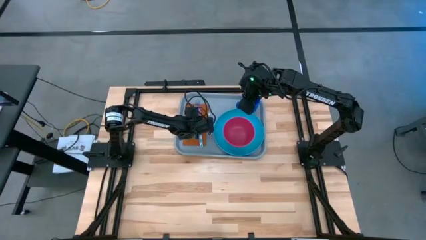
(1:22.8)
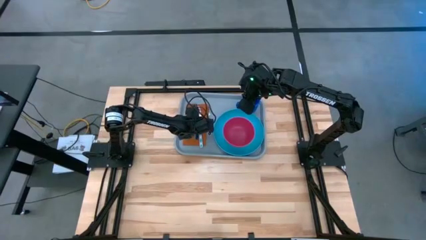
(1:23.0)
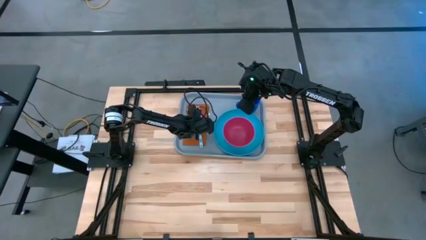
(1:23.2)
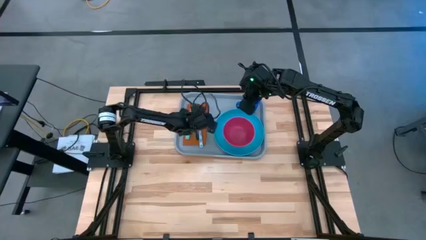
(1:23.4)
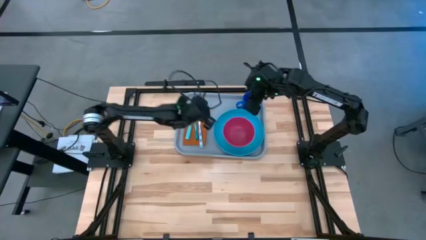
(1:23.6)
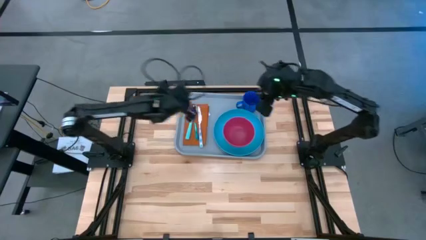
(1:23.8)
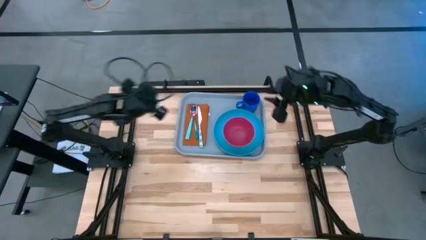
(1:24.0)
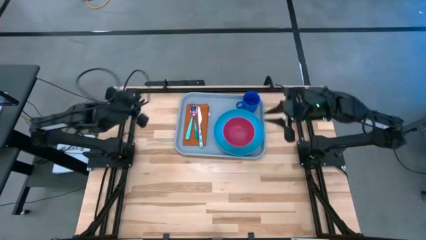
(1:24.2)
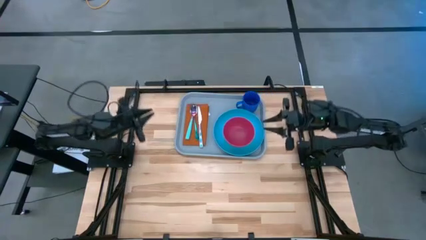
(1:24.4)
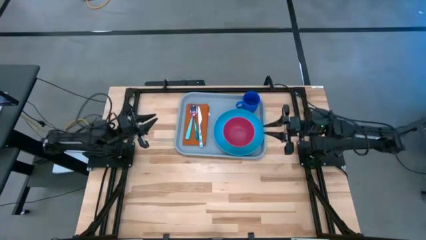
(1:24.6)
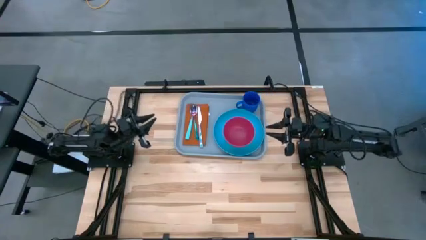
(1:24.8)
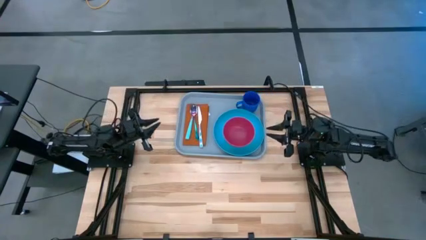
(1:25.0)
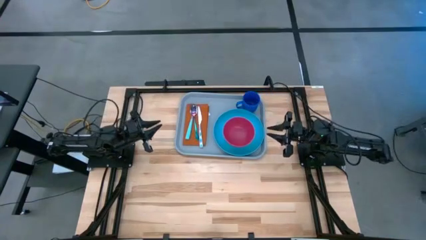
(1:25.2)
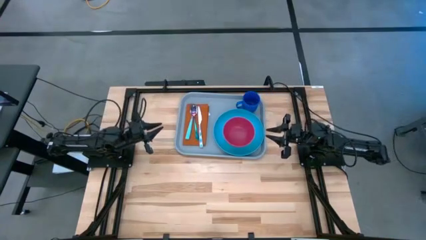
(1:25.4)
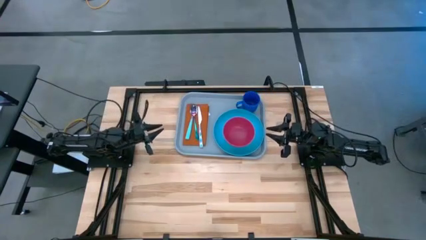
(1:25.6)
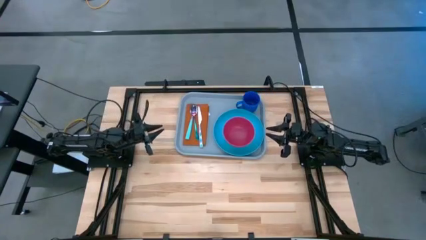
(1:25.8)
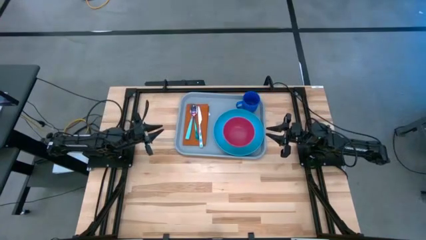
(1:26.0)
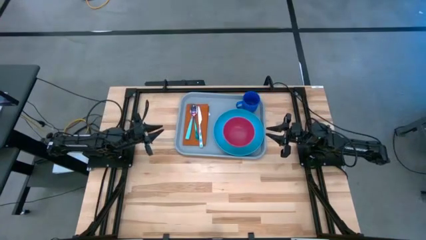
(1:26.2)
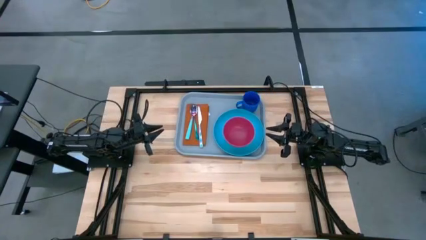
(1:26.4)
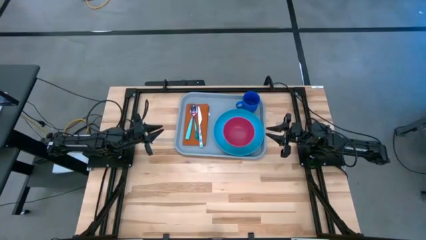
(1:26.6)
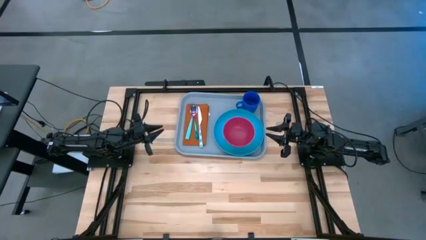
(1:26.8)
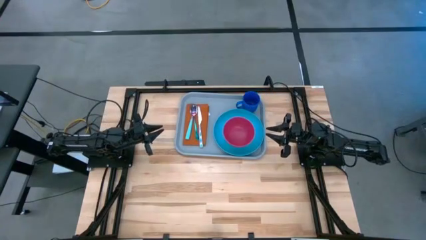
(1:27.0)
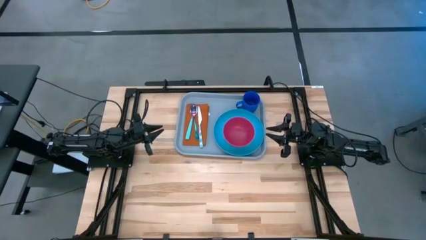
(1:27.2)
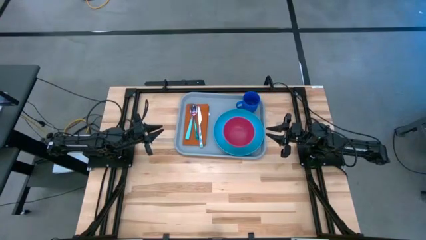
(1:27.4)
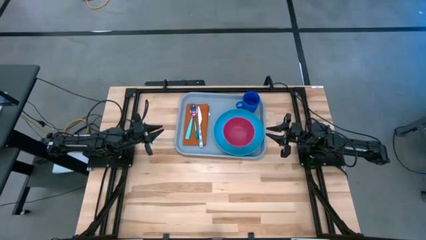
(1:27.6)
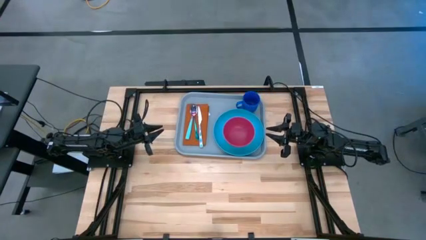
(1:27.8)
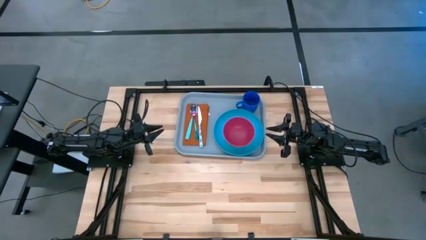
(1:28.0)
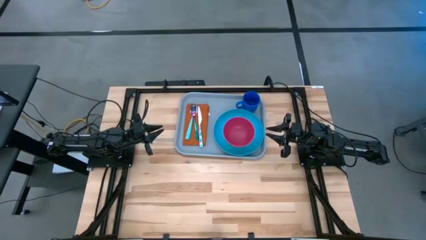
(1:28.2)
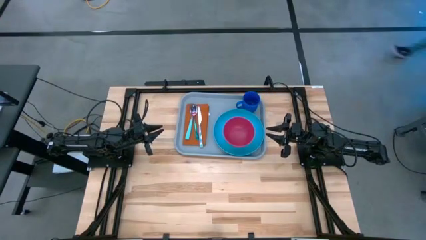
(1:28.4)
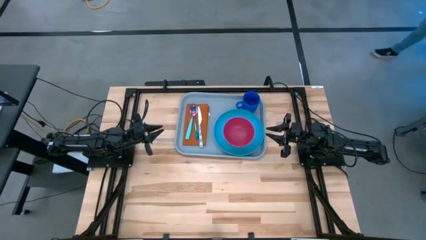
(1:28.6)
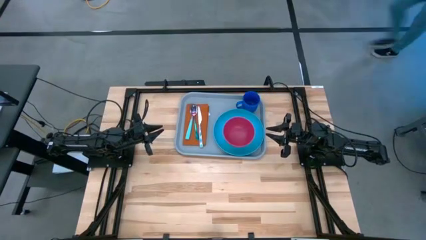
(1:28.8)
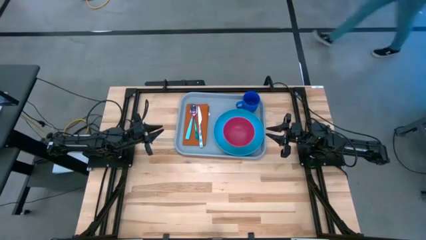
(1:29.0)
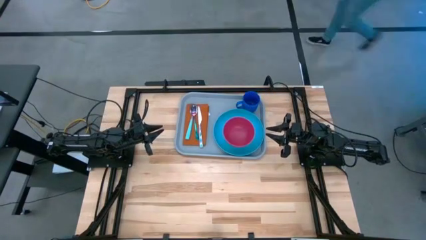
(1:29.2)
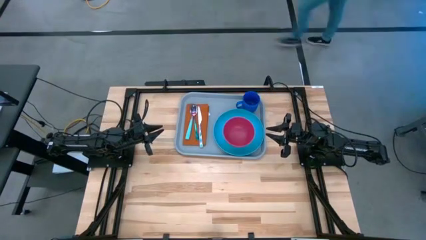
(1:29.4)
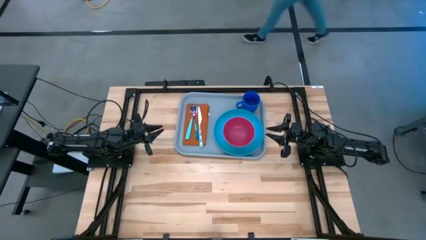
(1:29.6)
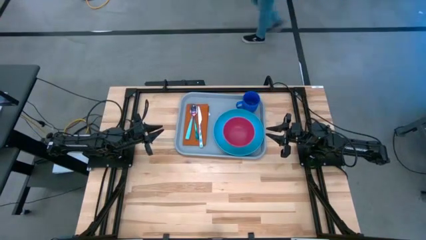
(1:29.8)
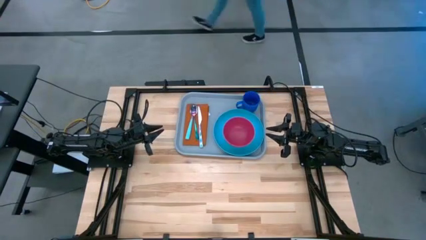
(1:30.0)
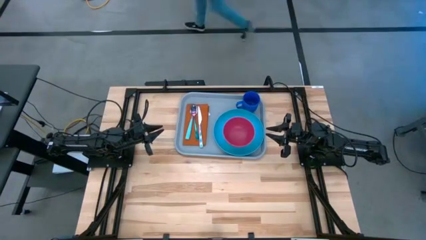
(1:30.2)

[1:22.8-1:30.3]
Task: Set up tray
Return to Home Position

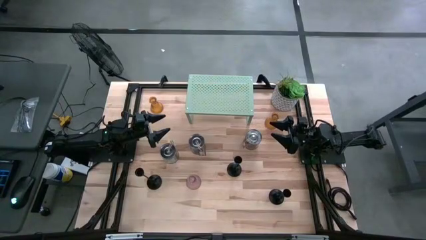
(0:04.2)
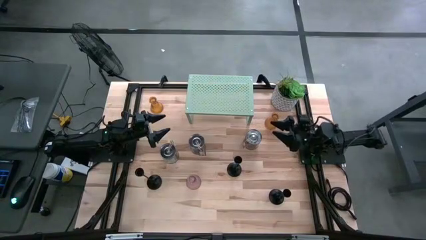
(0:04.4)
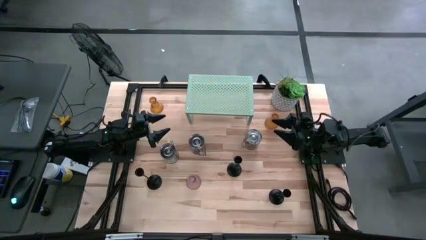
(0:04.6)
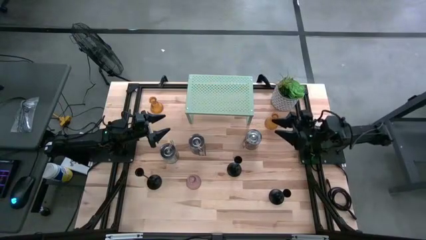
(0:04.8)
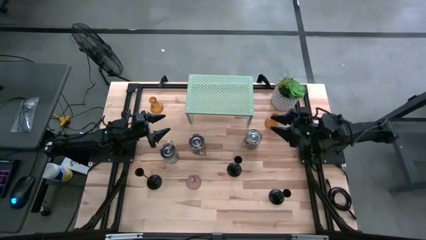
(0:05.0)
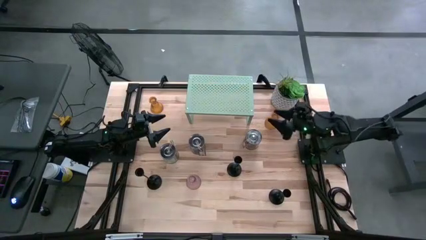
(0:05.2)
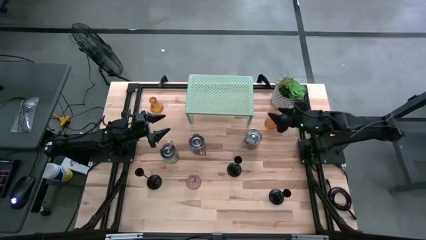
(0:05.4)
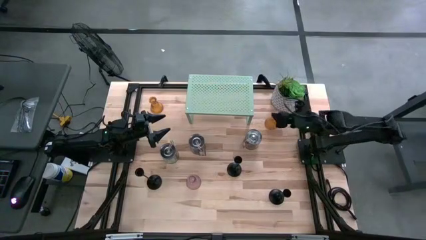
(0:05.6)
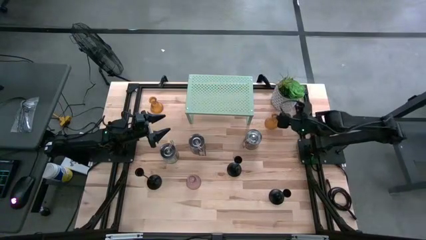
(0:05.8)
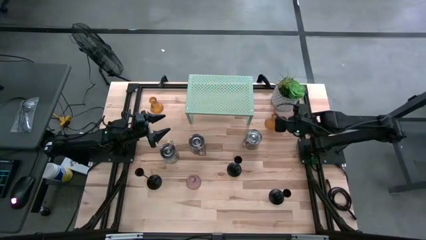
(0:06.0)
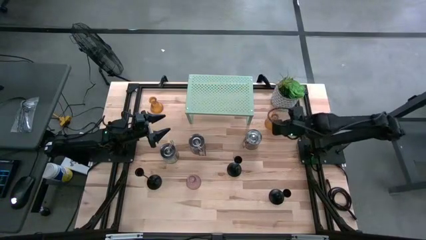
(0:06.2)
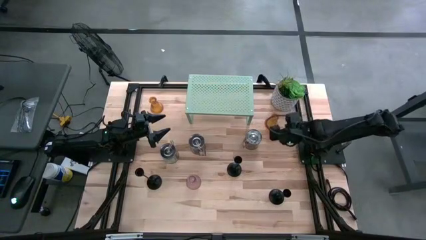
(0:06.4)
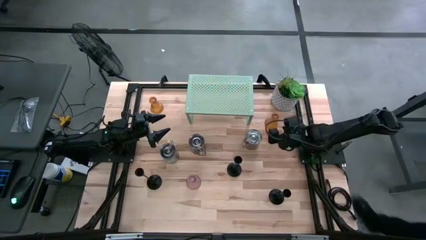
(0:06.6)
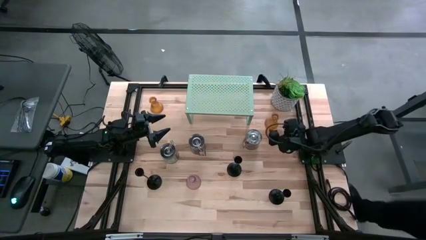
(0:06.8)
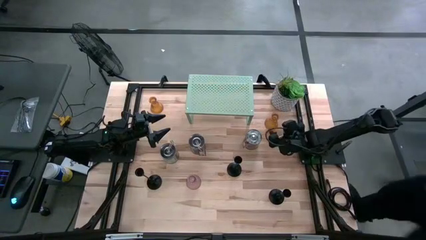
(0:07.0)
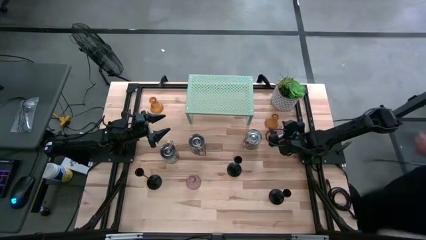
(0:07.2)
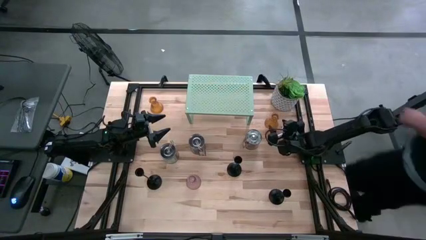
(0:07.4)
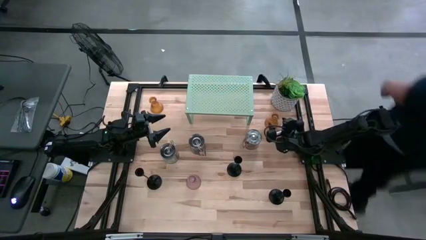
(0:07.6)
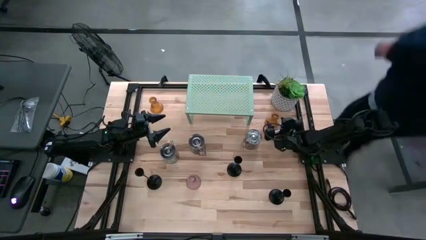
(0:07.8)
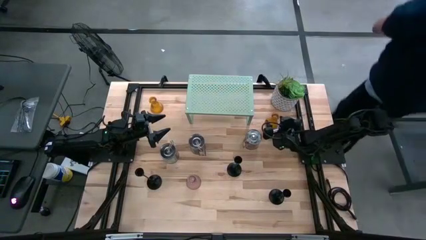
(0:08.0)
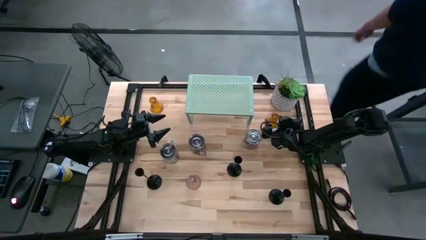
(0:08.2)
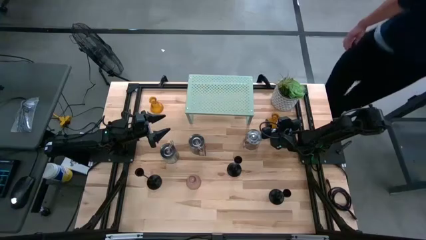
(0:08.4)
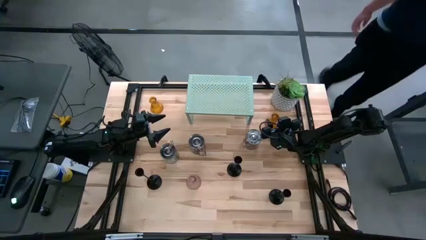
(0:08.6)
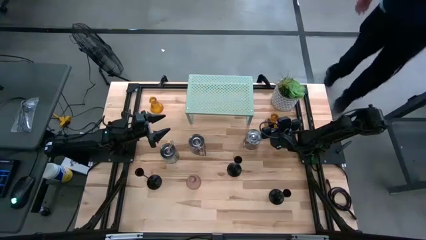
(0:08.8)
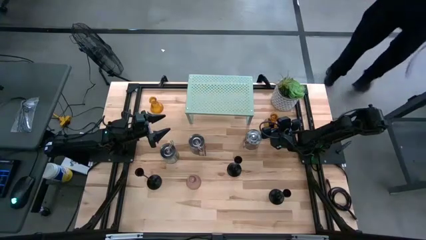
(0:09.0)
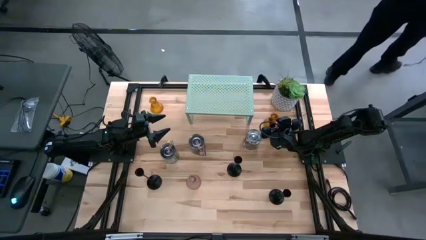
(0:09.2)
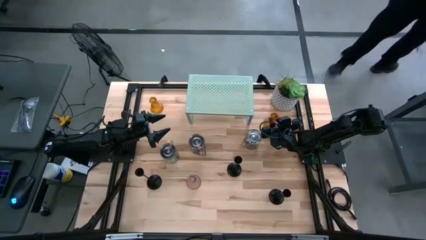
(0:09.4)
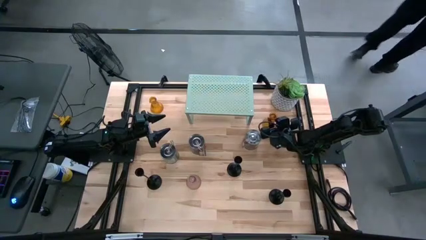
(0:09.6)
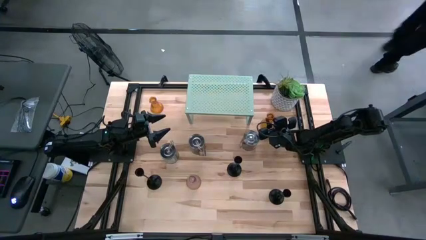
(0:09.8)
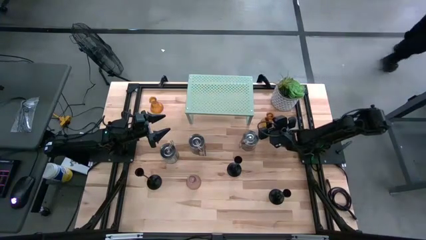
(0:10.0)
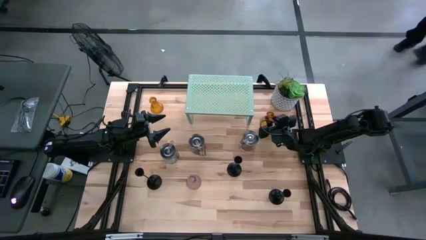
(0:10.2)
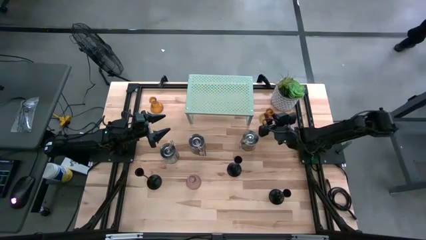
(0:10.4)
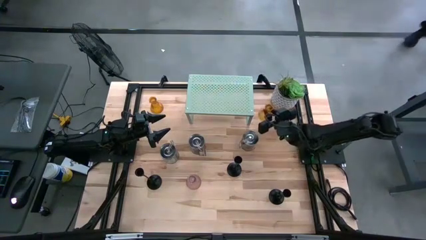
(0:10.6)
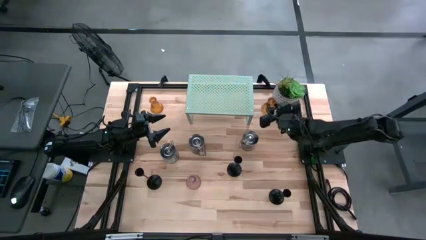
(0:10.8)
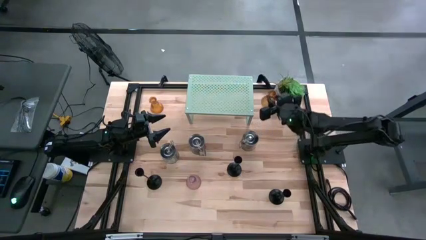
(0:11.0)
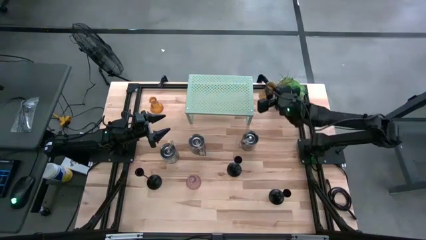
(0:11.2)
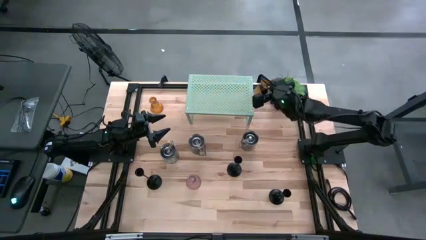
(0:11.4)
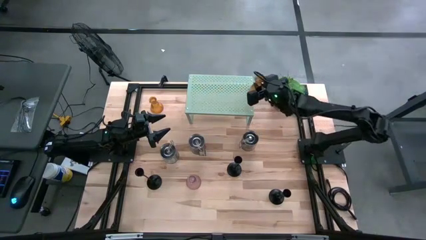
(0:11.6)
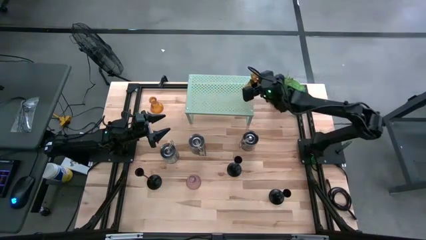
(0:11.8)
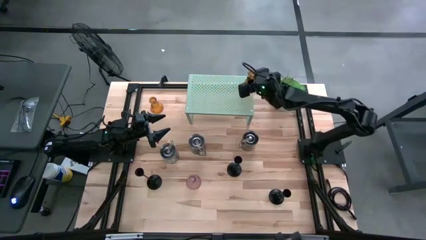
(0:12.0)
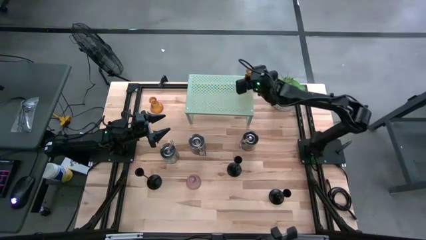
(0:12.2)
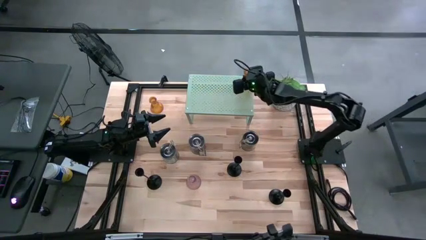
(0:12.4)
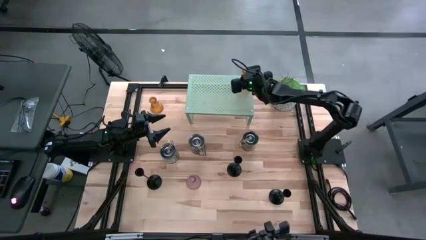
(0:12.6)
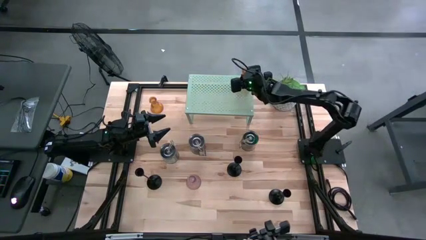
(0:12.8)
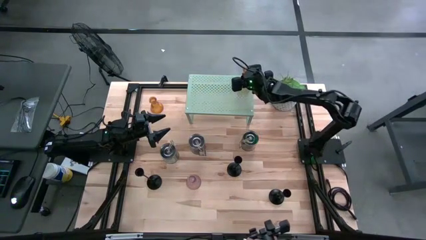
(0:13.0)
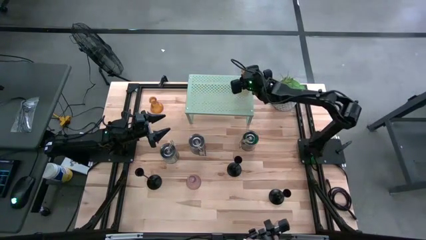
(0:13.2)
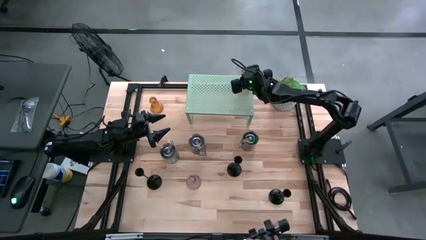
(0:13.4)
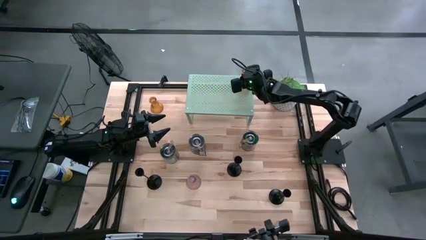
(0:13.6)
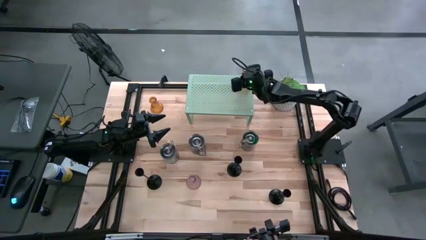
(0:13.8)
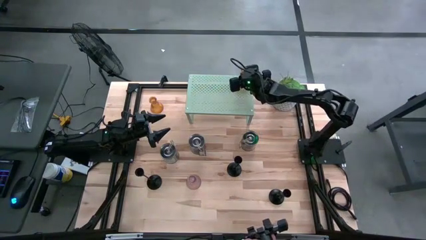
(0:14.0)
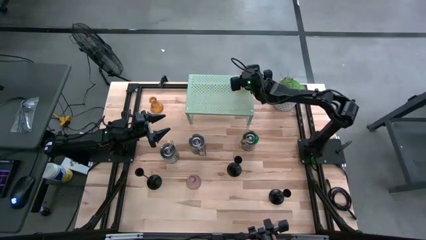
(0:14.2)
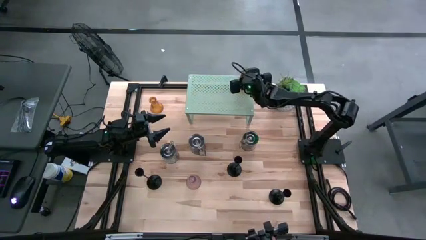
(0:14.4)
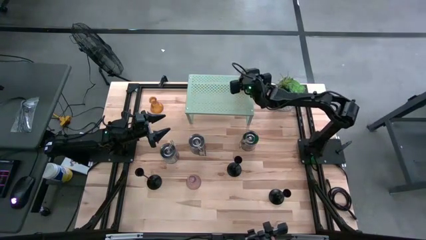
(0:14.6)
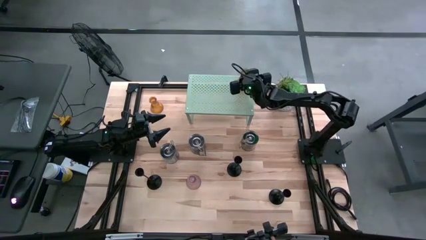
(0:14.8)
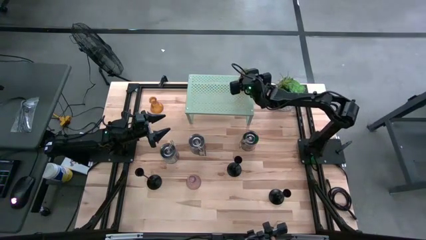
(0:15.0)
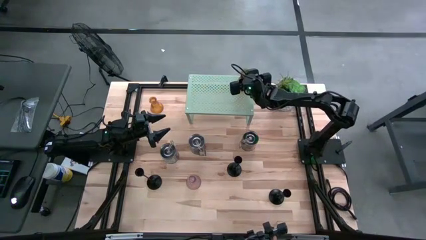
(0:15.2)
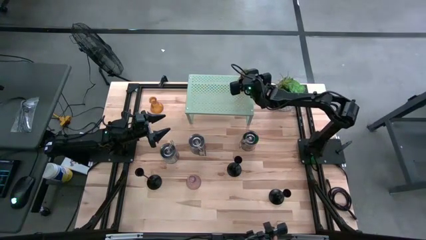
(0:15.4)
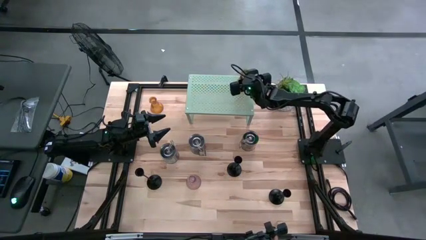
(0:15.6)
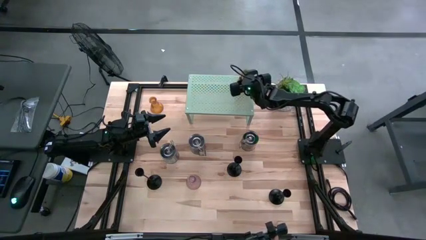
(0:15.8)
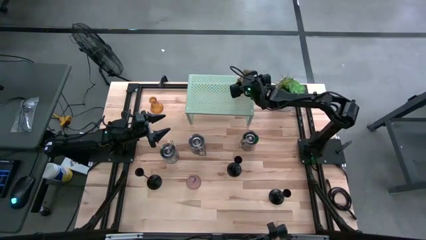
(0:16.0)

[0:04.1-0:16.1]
Task: Pick & Place candle stick holders
Put the right yellow candle holder on the shelf
